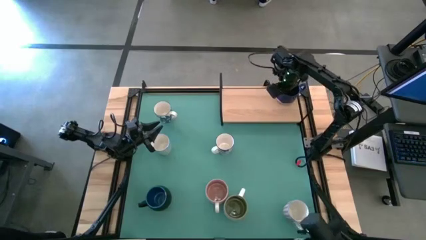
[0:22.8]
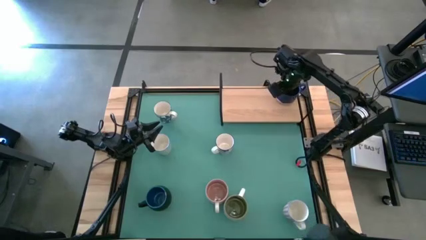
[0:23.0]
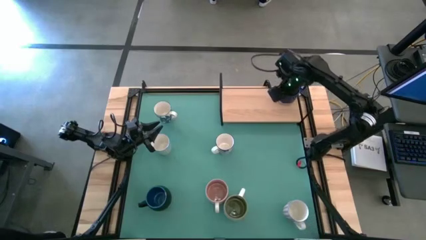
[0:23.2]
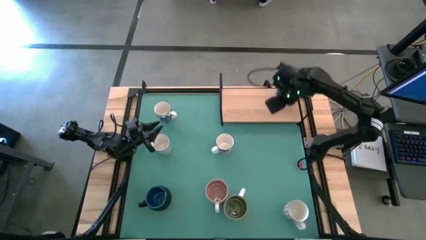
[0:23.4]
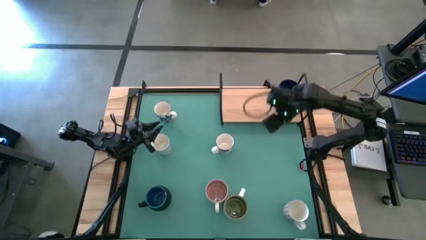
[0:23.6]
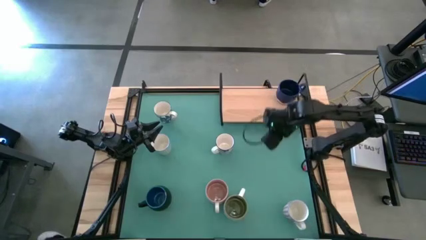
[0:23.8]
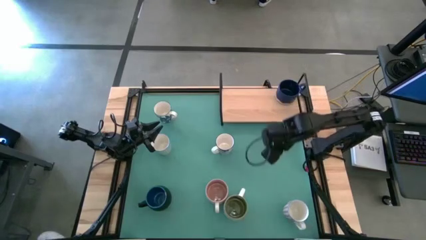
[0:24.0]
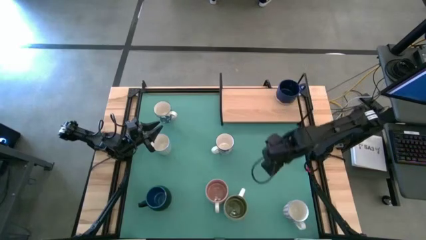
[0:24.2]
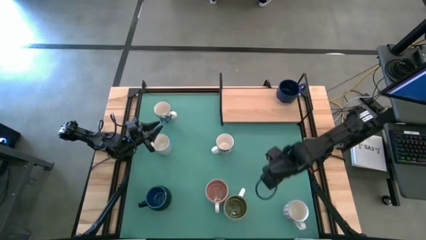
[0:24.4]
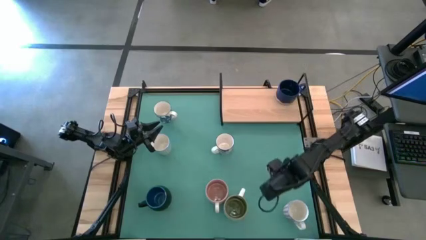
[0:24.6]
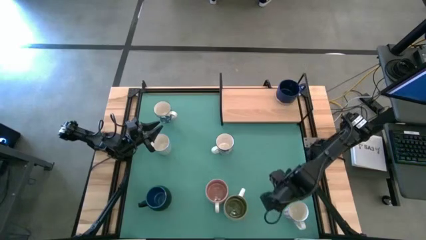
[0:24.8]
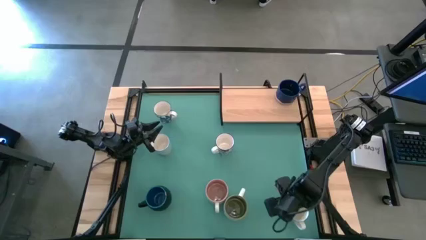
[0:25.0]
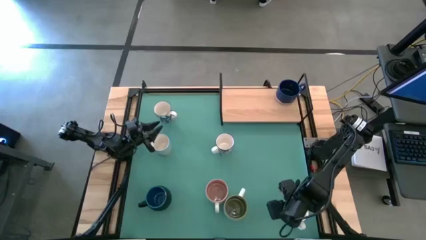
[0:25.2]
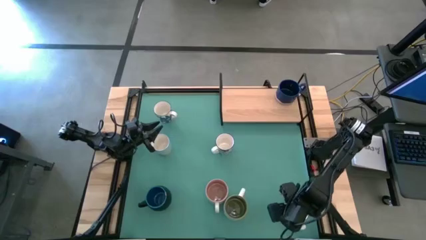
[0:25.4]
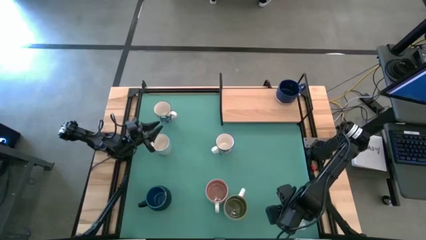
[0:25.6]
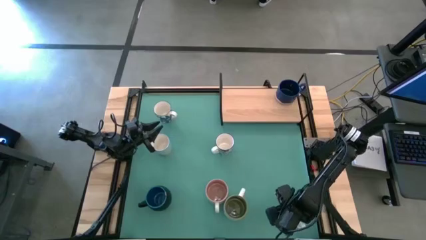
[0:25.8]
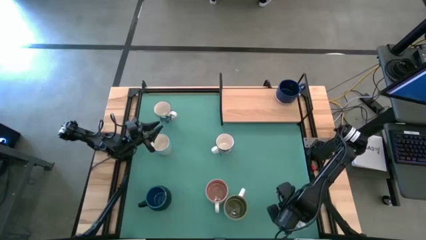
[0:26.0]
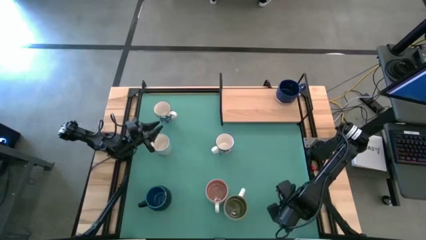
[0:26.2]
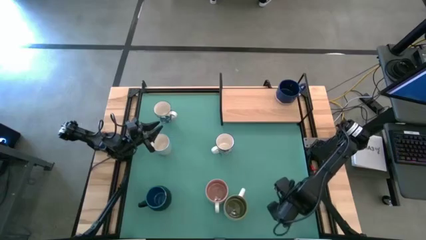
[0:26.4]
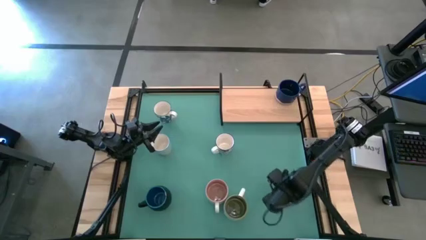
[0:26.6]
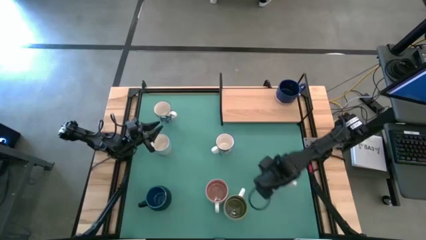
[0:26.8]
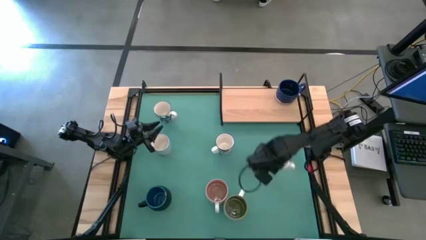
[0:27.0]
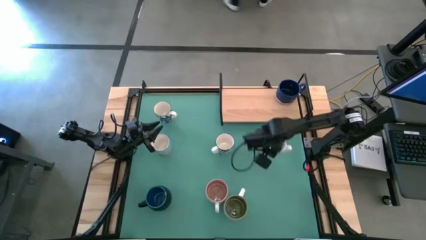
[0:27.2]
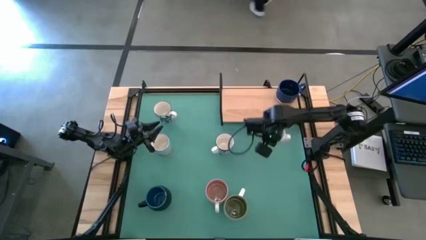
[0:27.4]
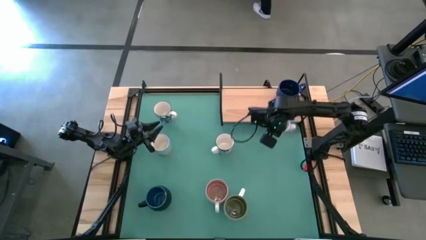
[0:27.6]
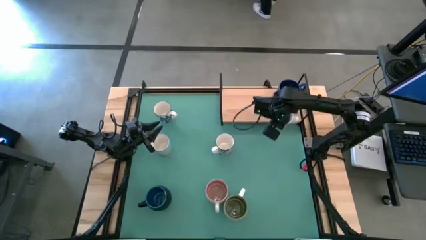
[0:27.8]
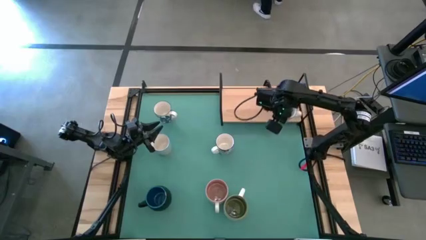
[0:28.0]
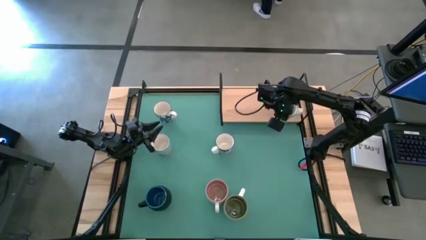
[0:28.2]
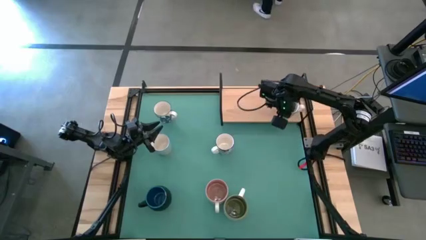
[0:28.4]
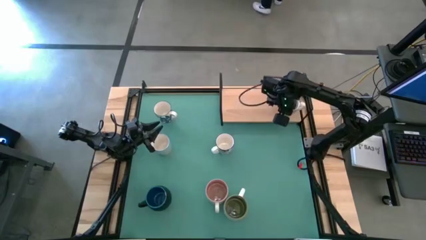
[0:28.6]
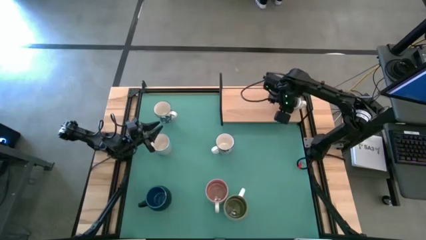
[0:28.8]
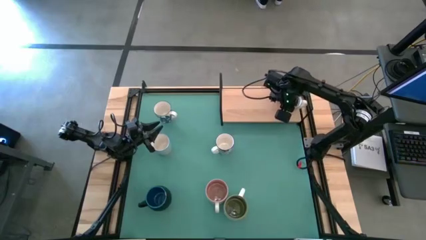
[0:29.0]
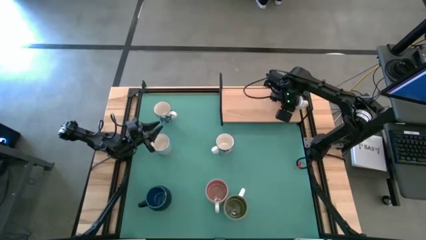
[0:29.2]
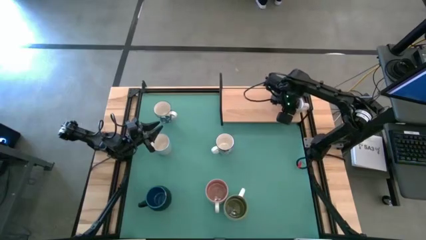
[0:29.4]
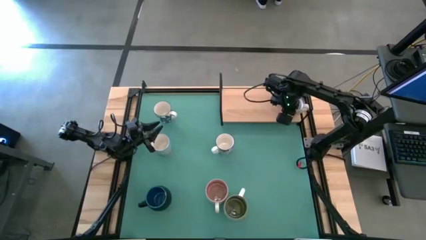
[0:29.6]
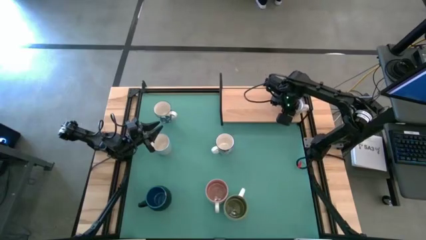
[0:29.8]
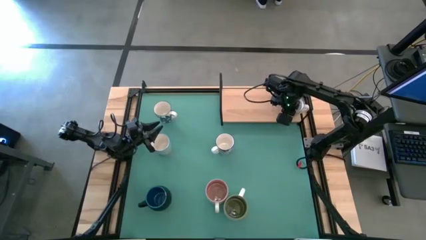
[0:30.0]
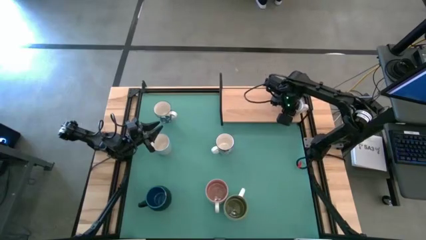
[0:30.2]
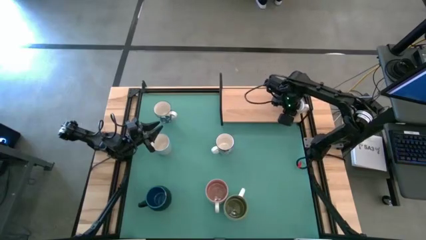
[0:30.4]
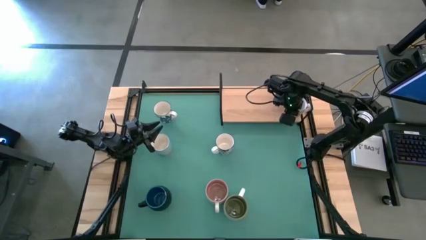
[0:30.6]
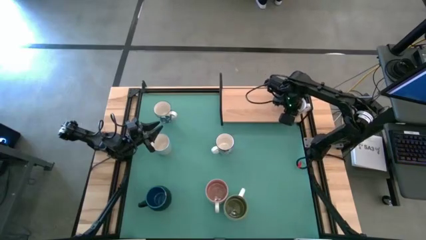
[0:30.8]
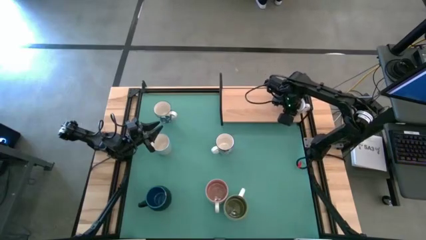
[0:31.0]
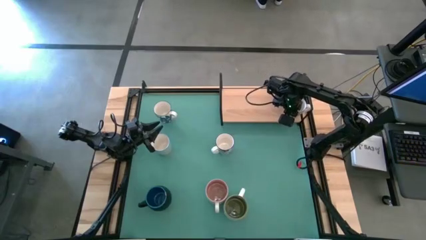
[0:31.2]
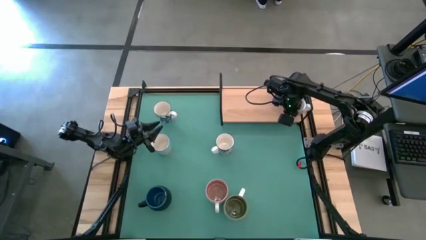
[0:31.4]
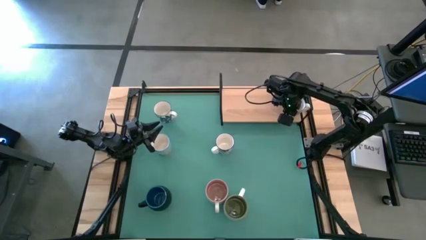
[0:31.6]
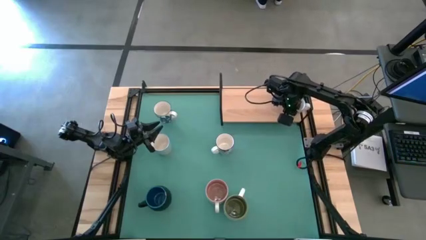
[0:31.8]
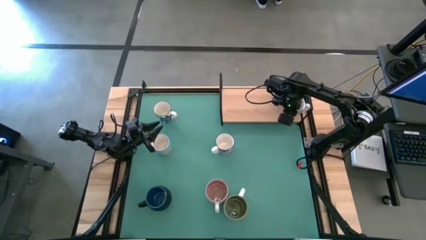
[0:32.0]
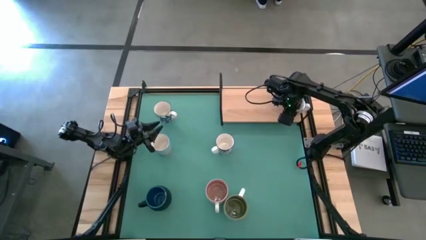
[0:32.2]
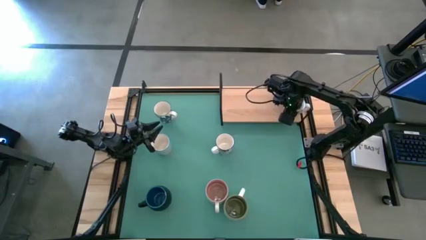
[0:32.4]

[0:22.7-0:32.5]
Task: Place coffee mugs
Put the red white pattern mug on the shelf
